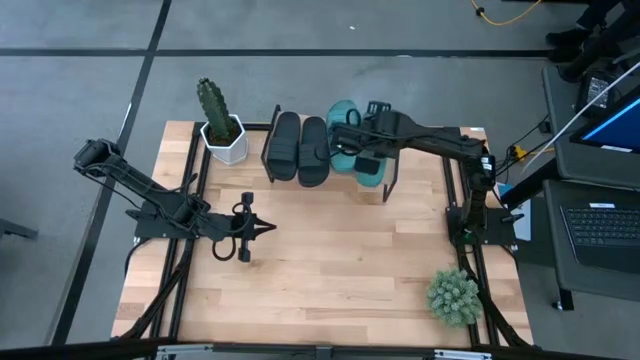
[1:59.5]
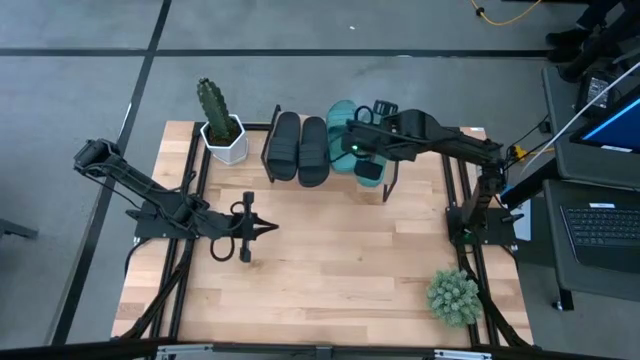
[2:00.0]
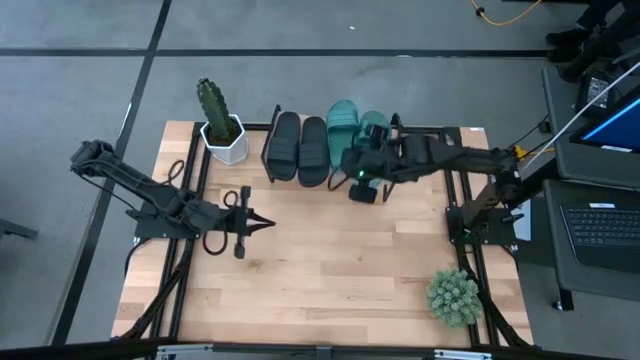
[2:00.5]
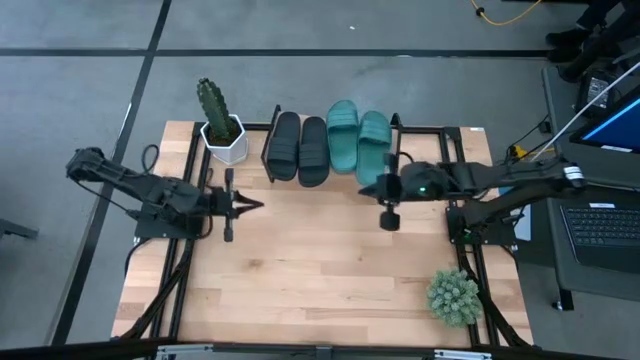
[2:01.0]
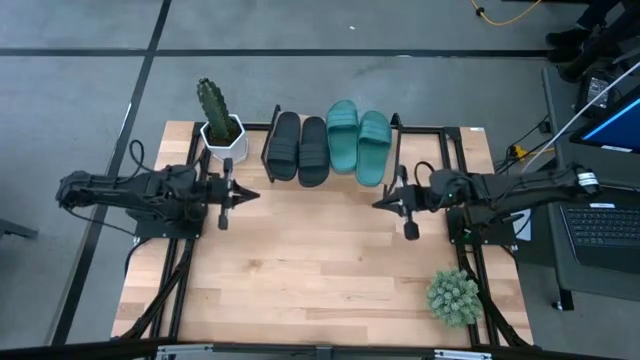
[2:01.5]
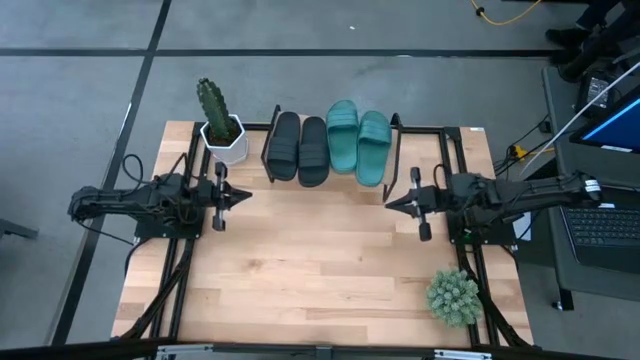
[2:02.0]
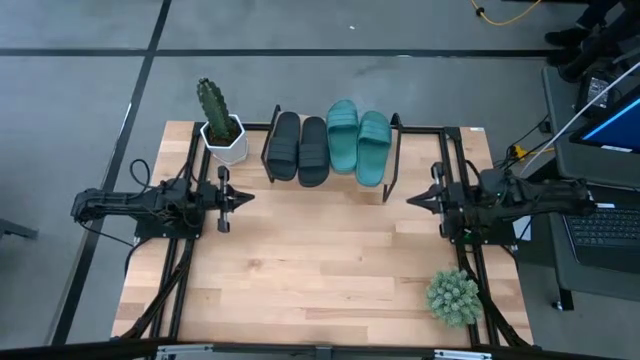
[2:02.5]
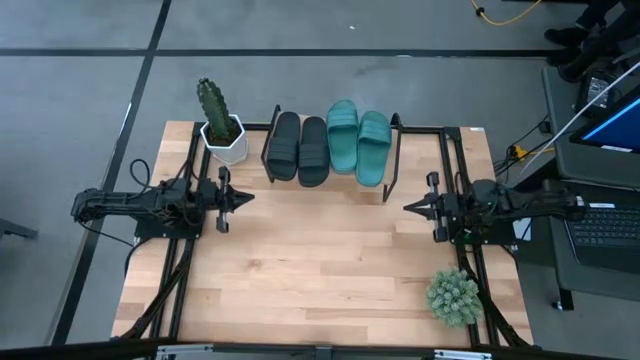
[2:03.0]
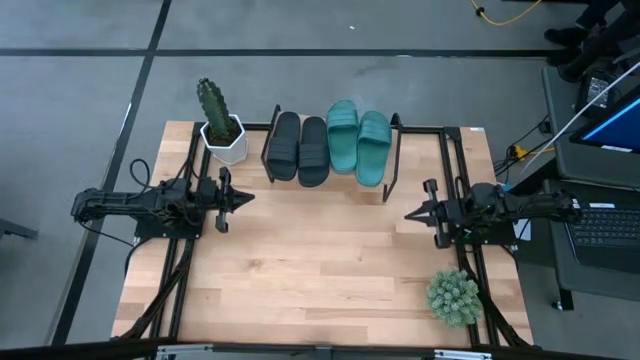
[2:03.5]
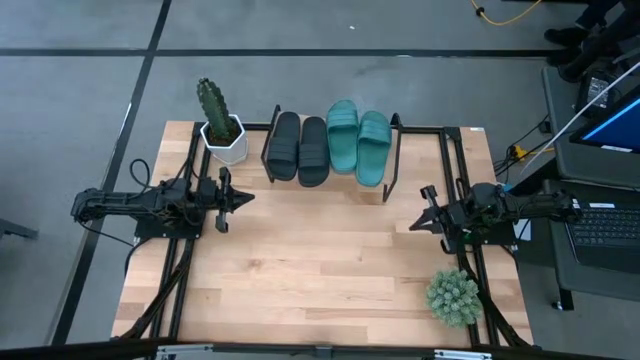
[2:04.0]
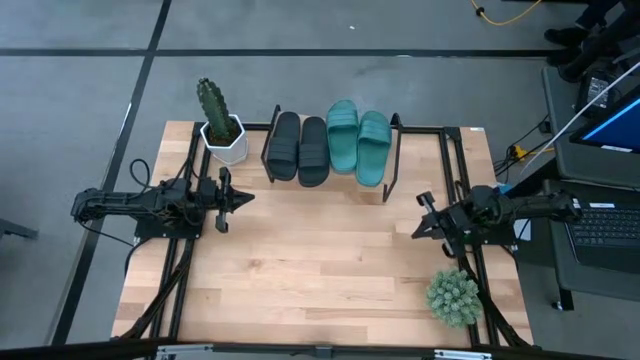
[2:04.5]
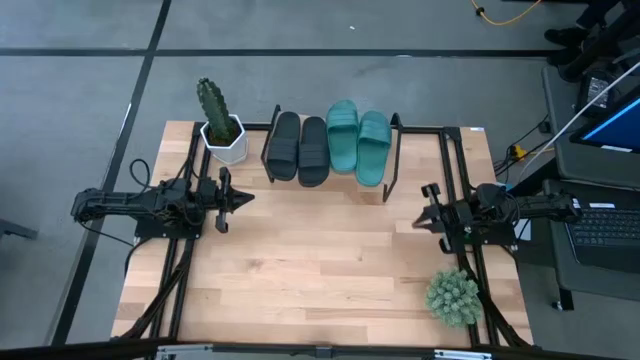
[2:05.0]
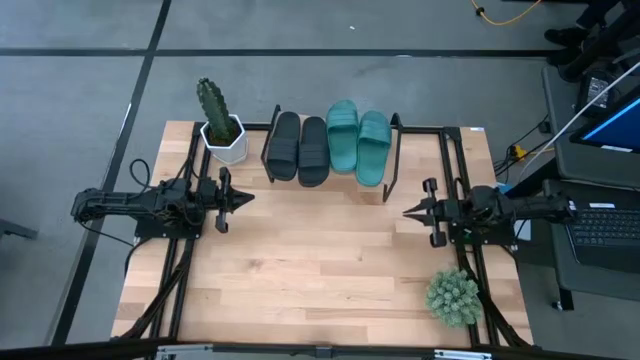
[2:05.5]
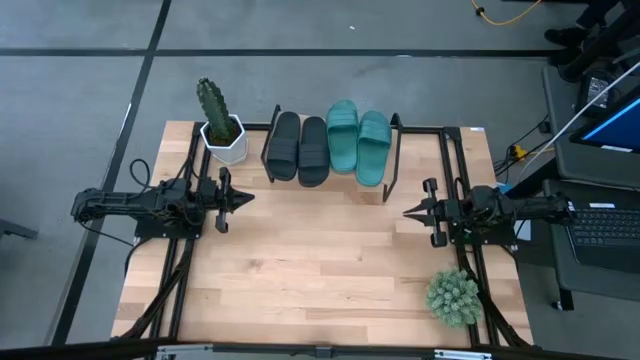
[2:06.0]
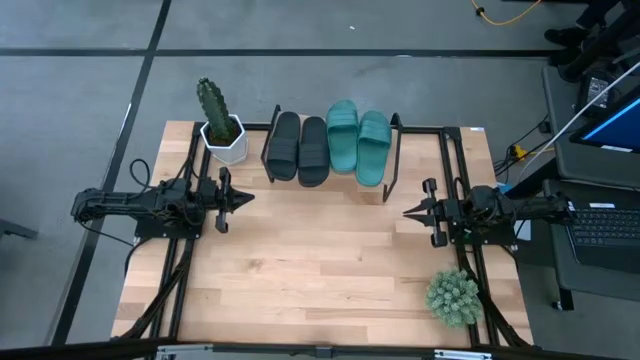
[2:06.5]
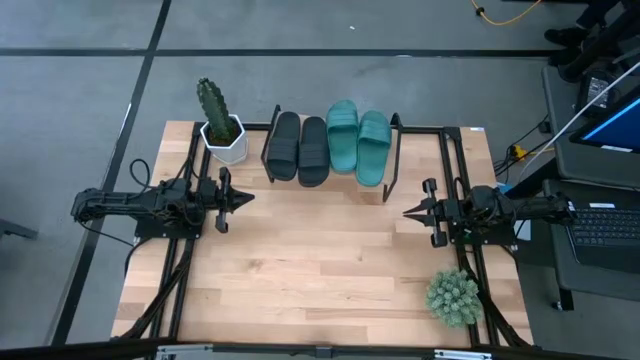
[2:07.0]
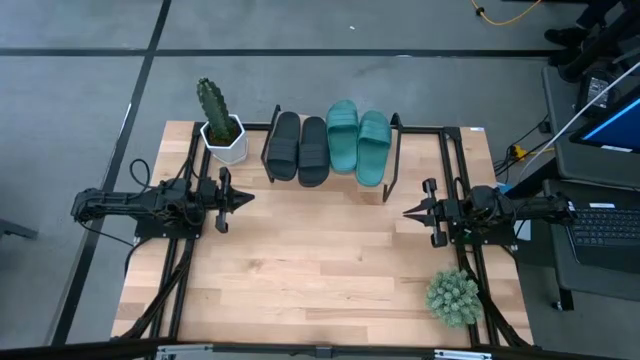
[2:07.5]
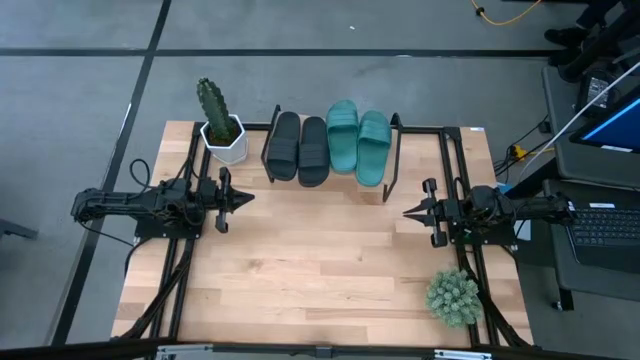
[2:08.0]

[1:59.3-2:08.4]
Task: Pick and place slides into the shelf
Return to Home Position

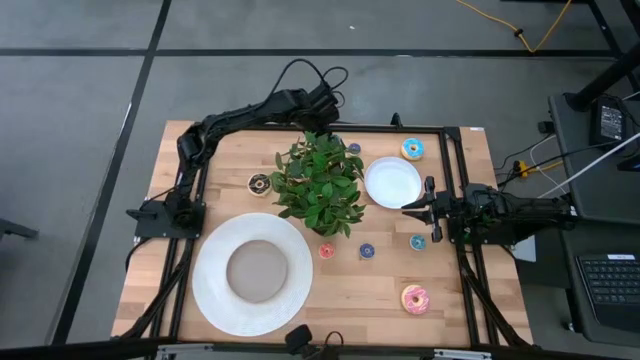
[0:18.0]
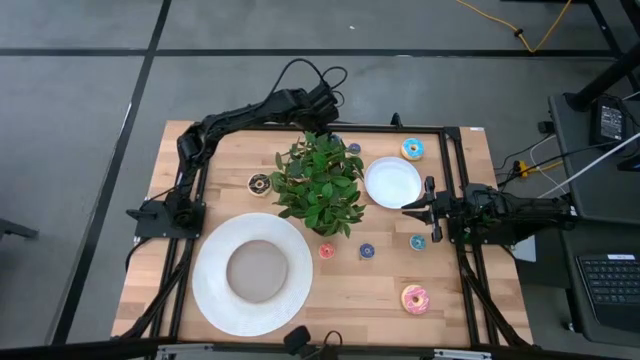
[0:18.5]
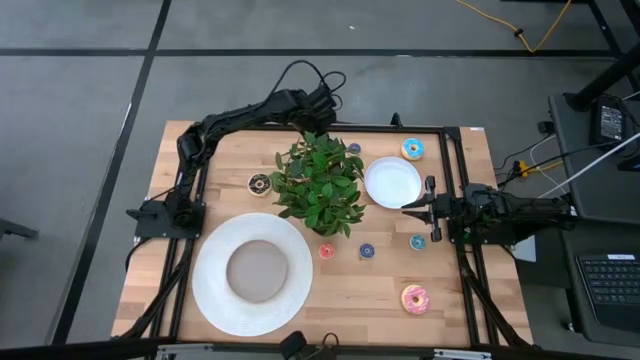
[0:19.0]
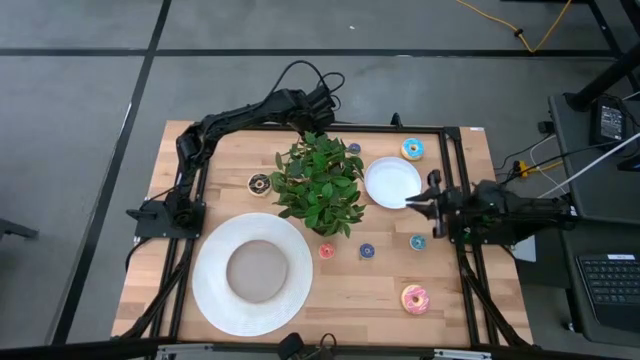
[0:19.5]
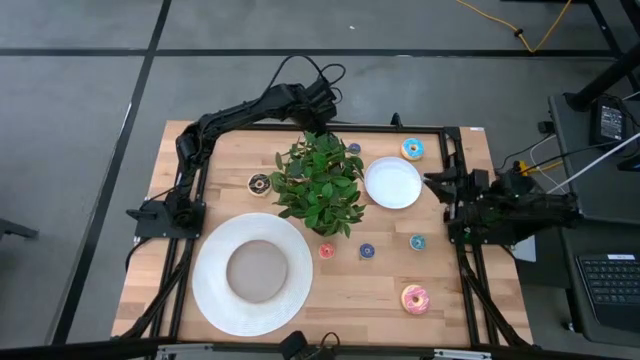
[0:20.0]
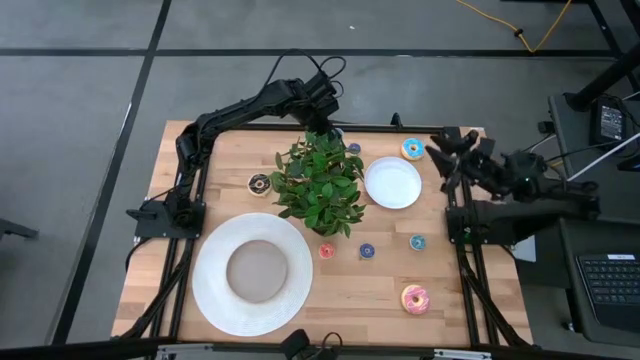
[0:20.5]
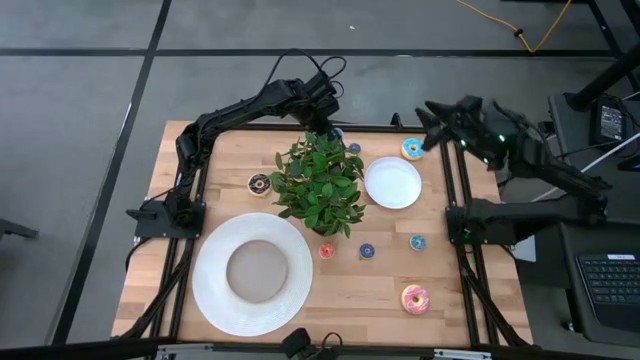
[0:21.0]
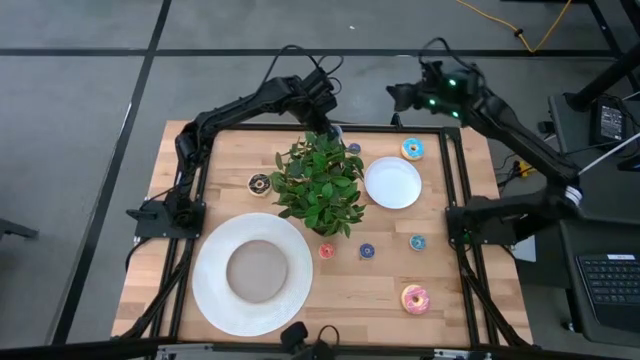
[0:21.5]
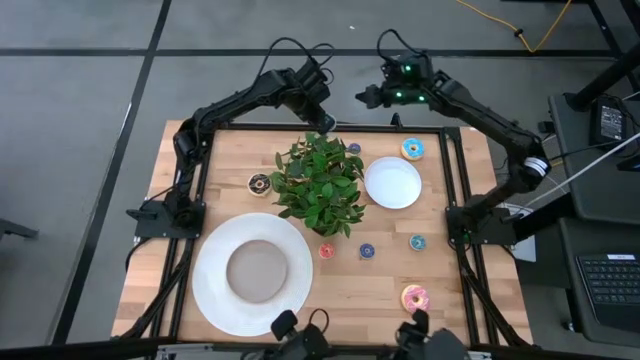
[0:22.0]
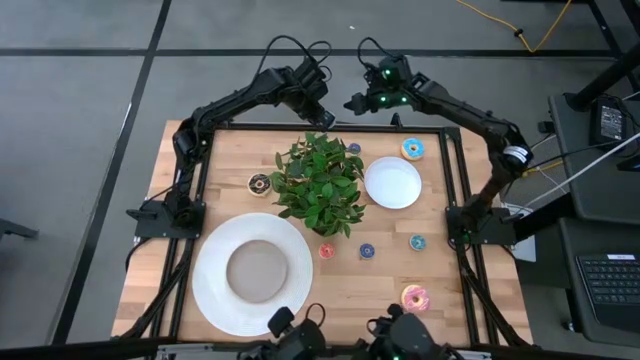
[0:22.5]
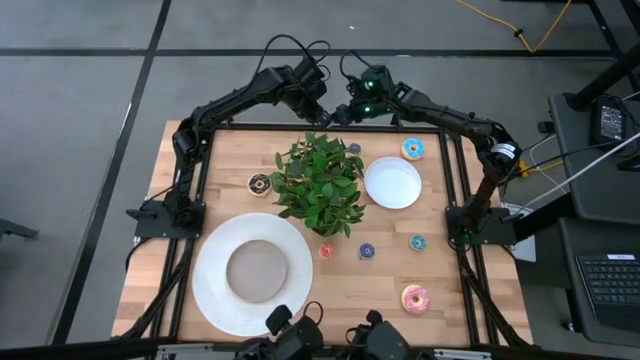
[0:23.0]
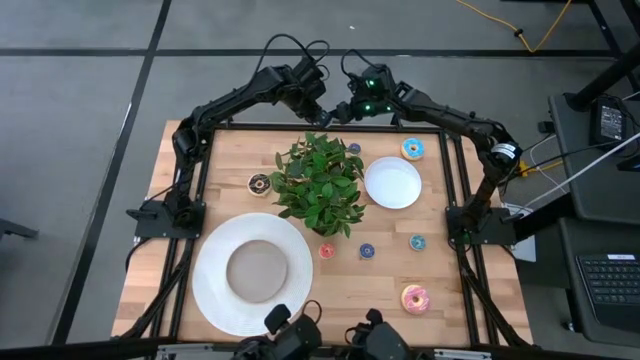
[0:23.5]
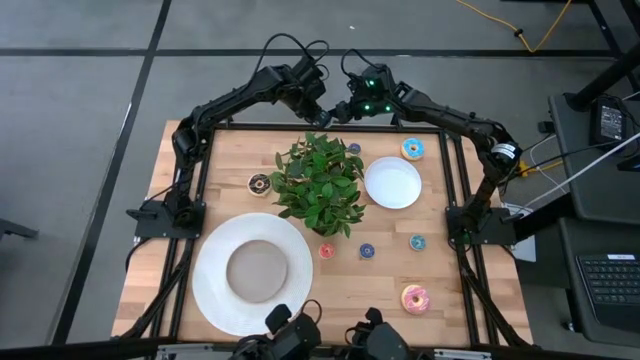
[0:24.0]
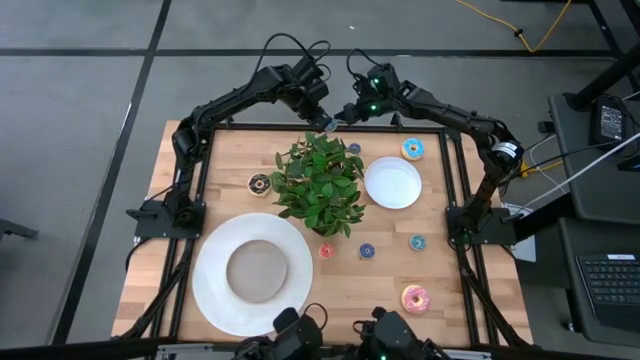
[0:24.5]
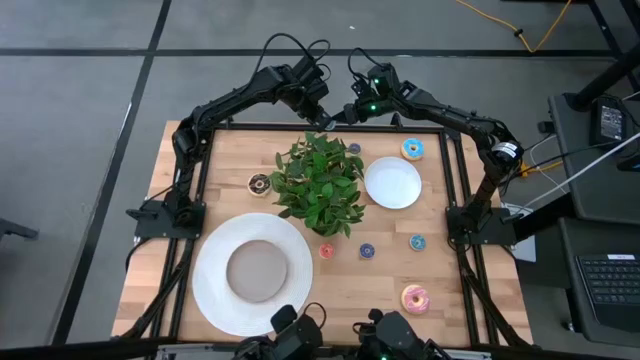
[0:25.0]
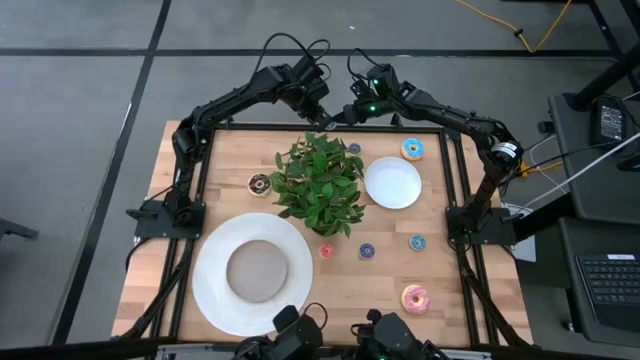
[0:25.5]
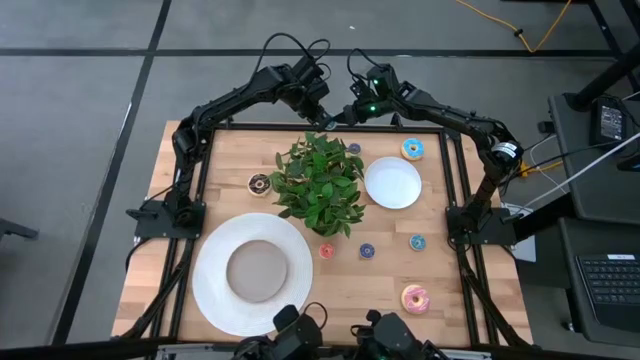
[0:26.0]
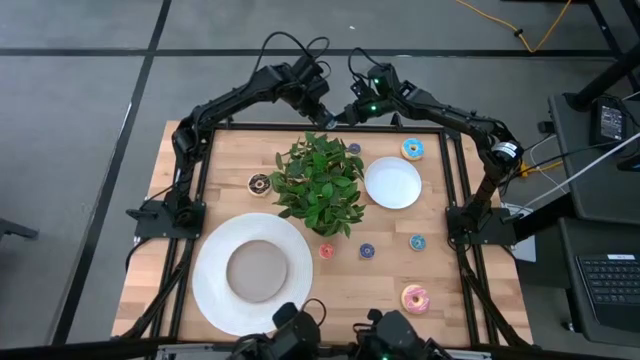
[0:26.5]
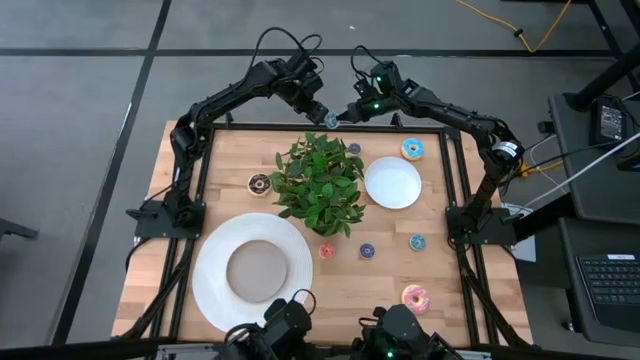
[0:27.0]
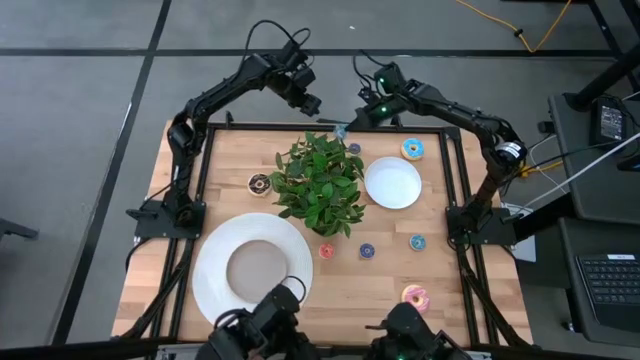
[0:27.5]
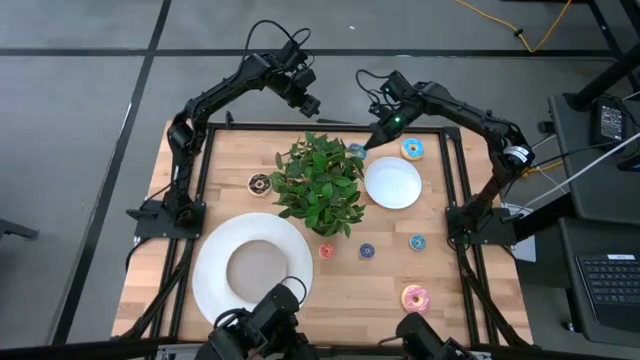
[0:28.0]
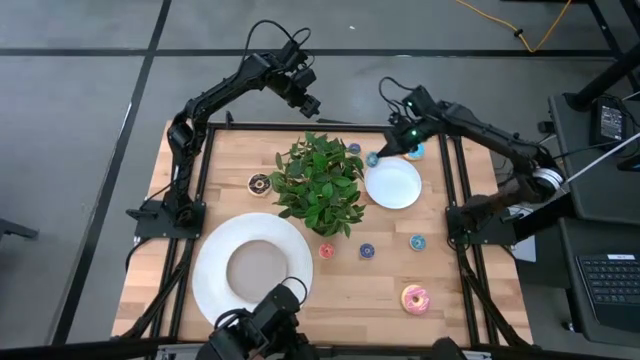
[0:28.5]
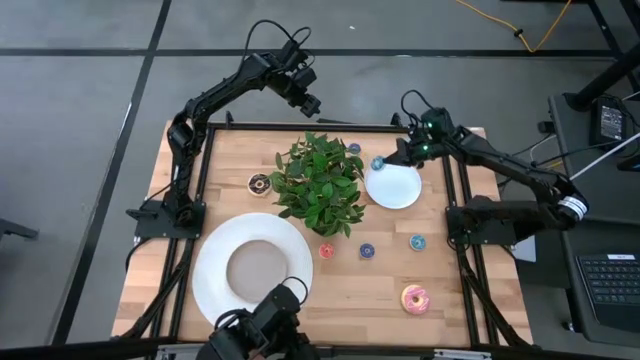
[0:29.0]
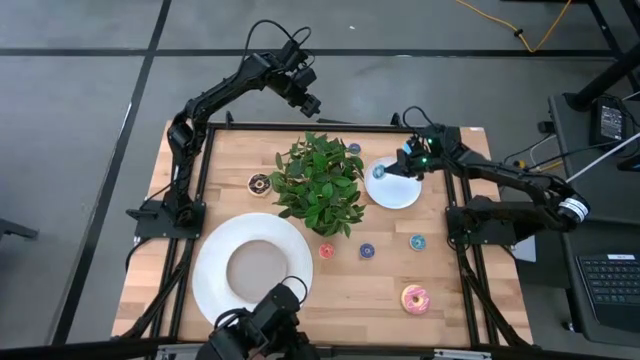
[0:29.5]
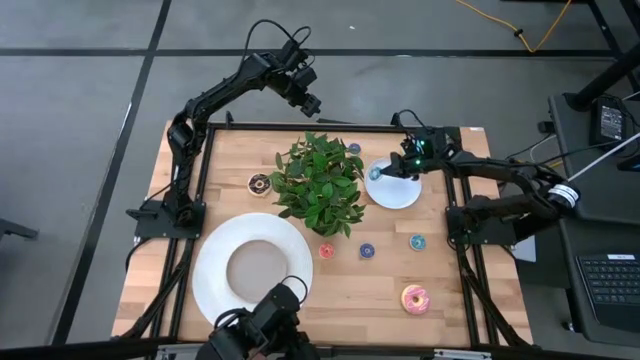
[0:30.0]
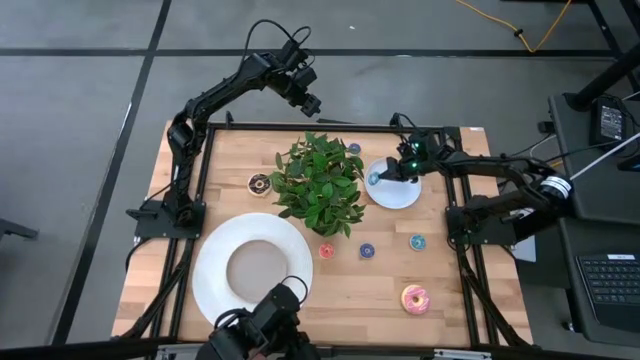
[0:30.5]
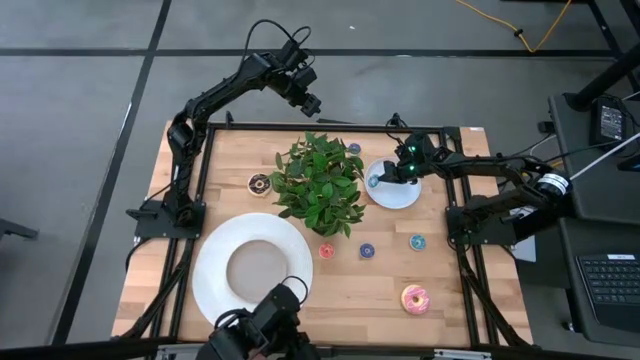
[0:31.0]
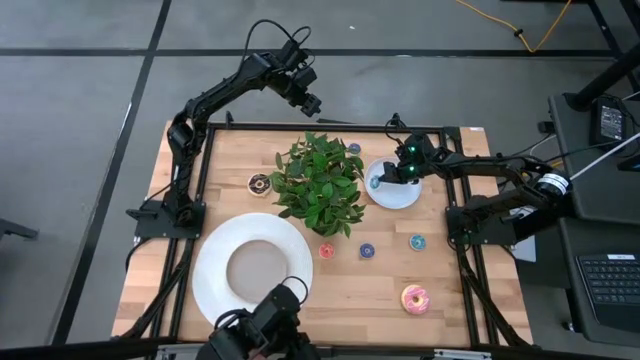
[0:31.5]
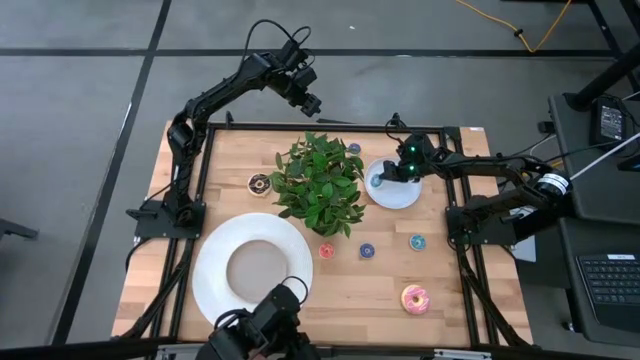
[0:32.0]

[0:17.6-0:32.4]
Task: Pick & Place donuts
Put the small light blue donut on the white plate
